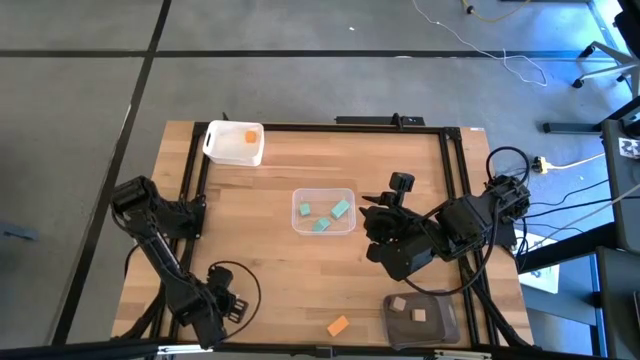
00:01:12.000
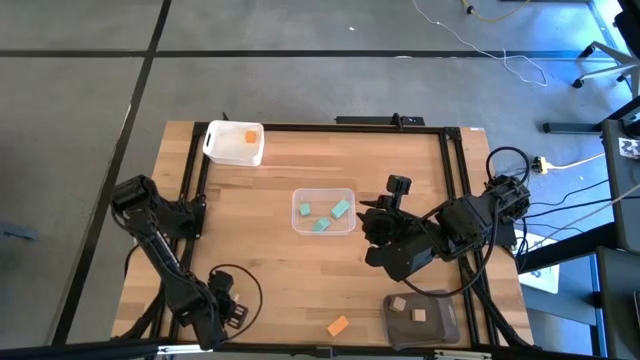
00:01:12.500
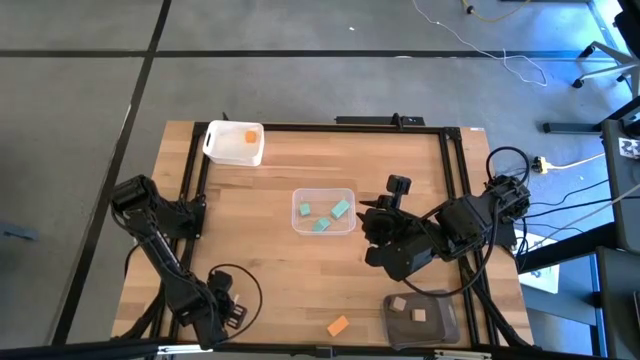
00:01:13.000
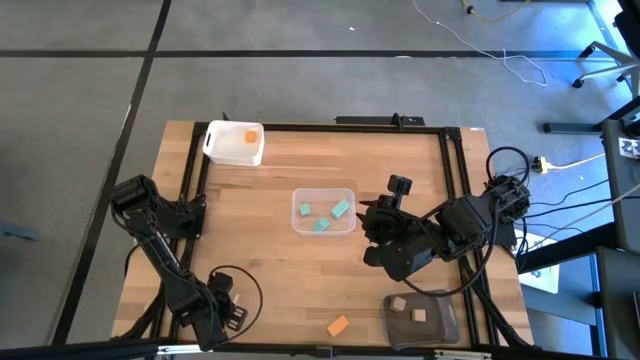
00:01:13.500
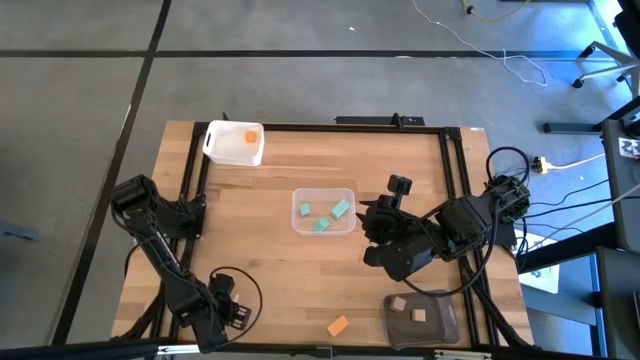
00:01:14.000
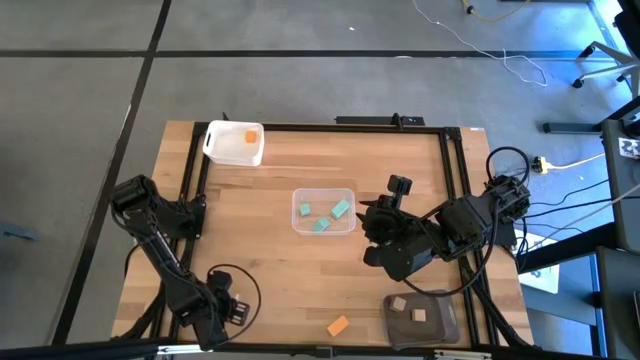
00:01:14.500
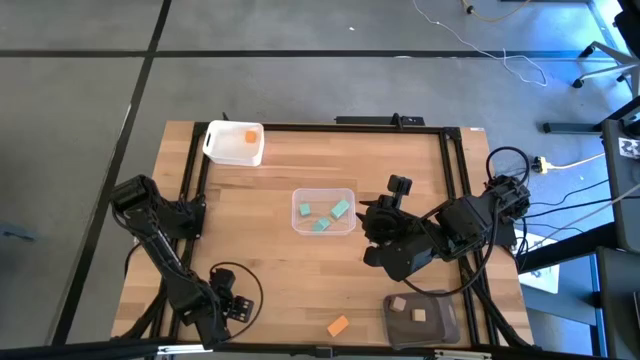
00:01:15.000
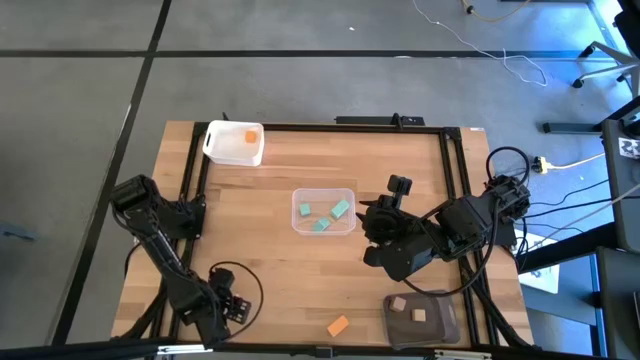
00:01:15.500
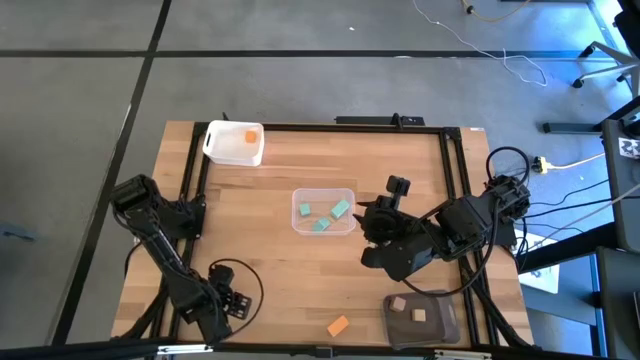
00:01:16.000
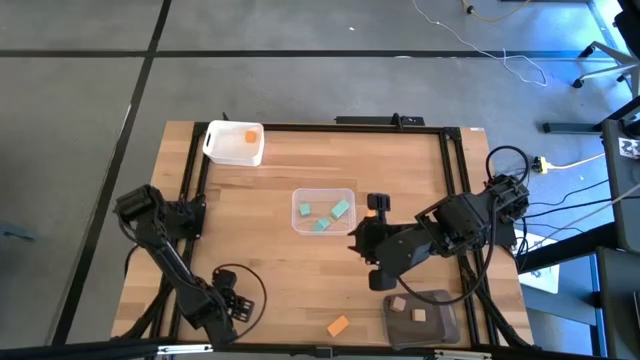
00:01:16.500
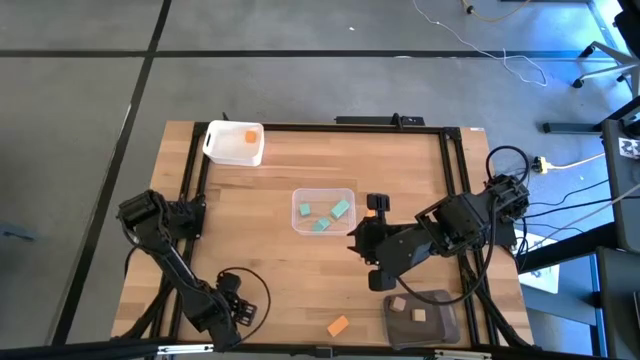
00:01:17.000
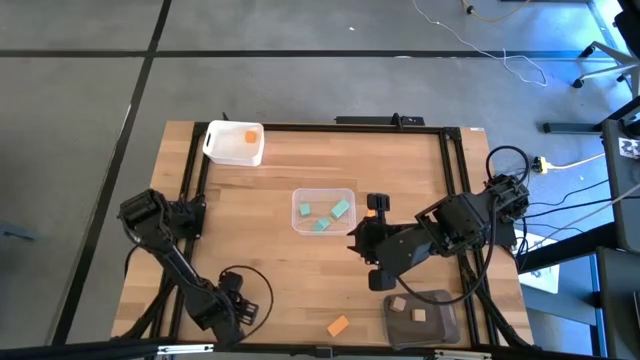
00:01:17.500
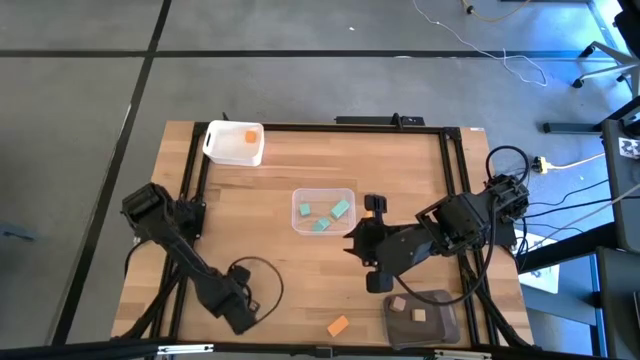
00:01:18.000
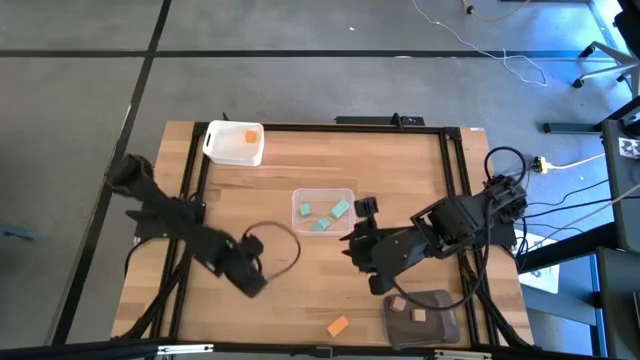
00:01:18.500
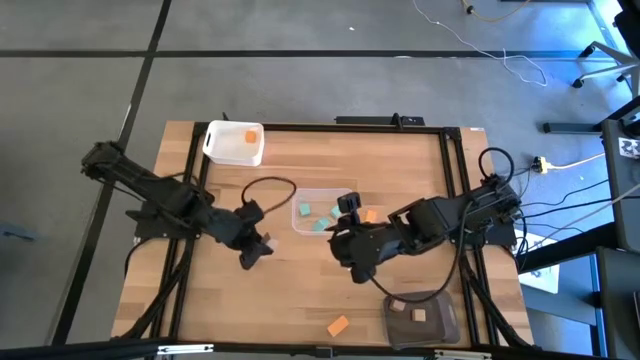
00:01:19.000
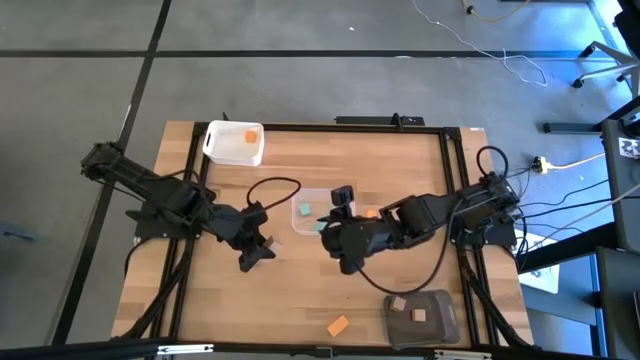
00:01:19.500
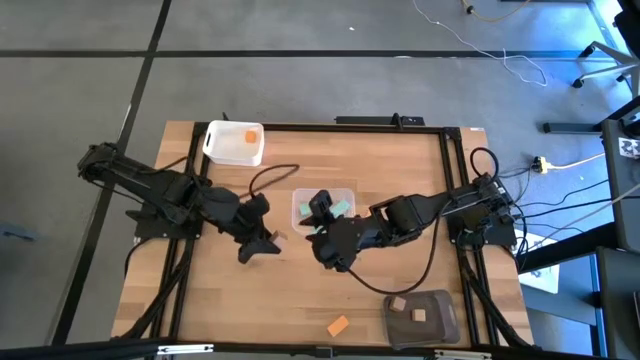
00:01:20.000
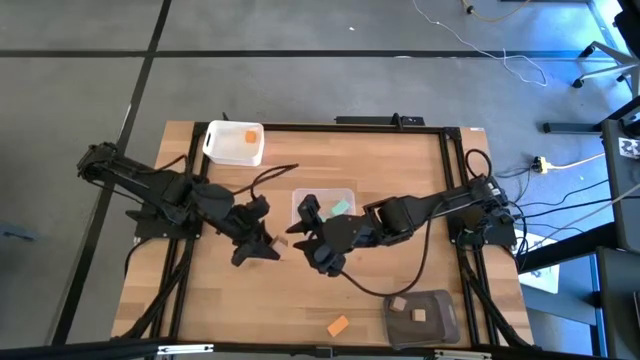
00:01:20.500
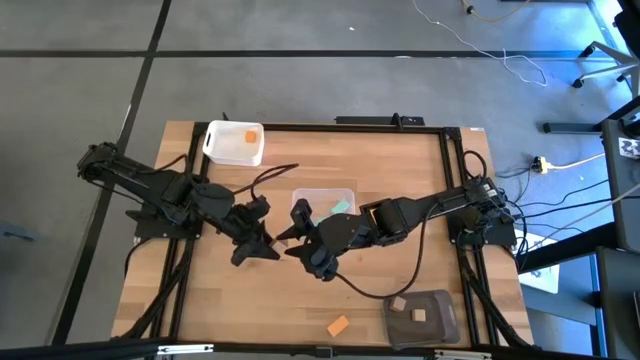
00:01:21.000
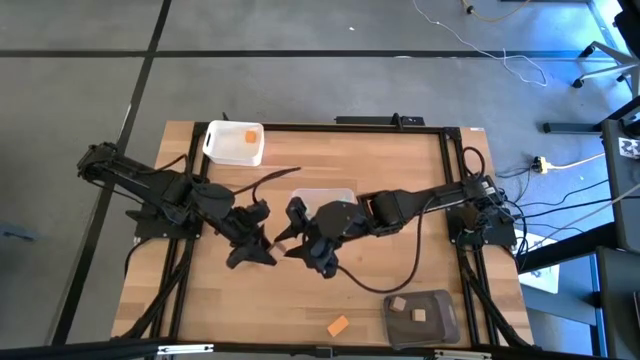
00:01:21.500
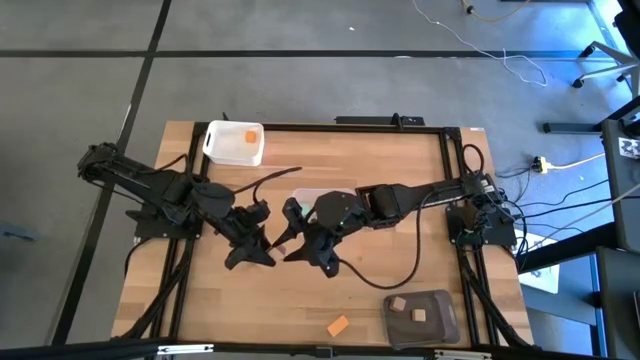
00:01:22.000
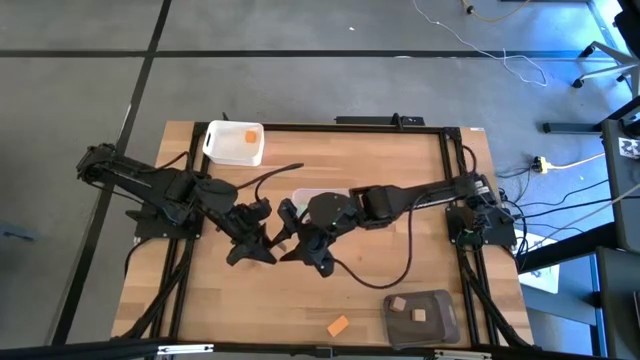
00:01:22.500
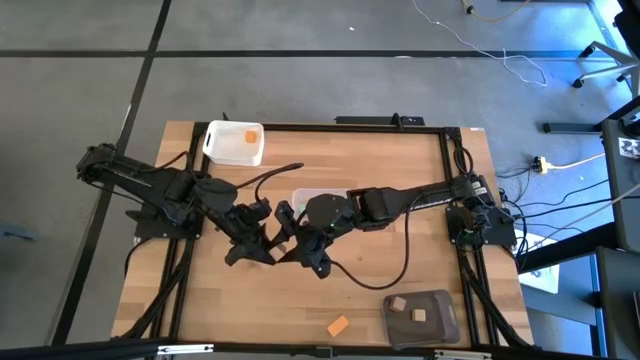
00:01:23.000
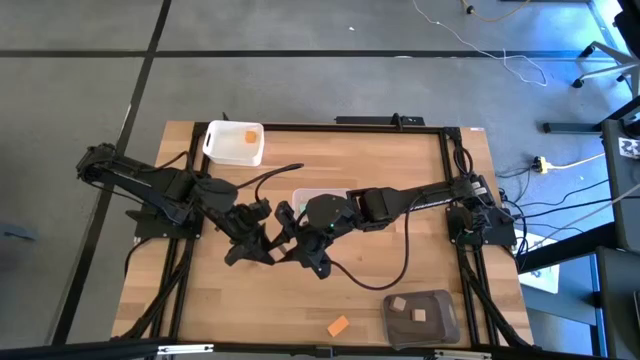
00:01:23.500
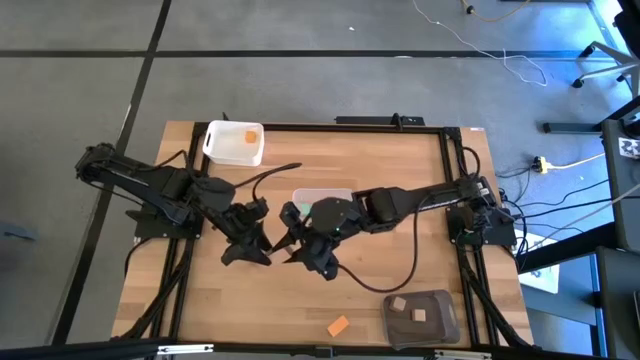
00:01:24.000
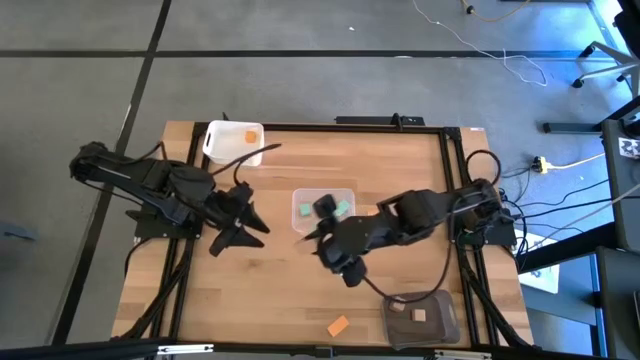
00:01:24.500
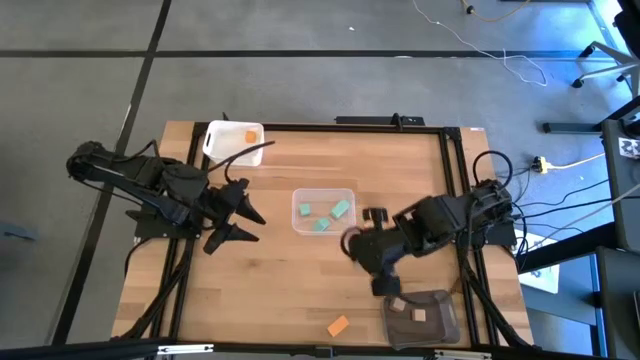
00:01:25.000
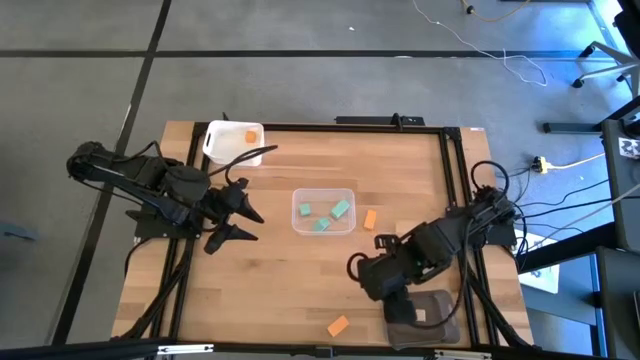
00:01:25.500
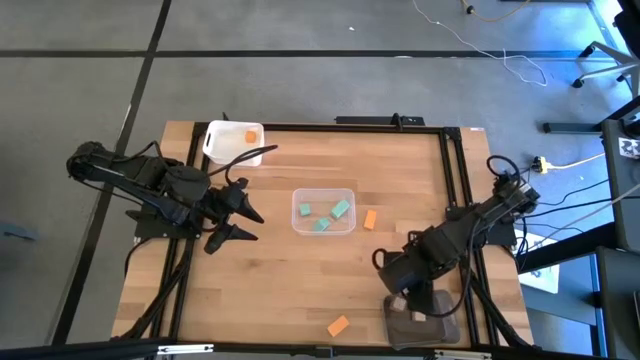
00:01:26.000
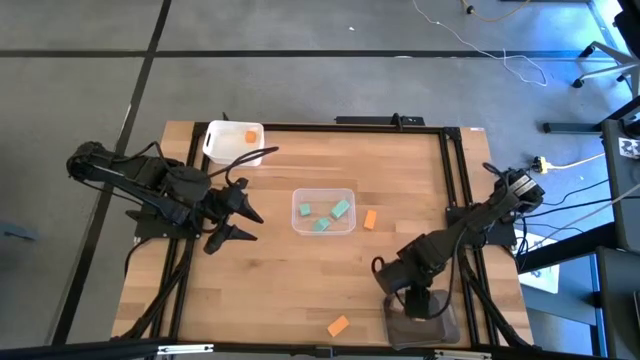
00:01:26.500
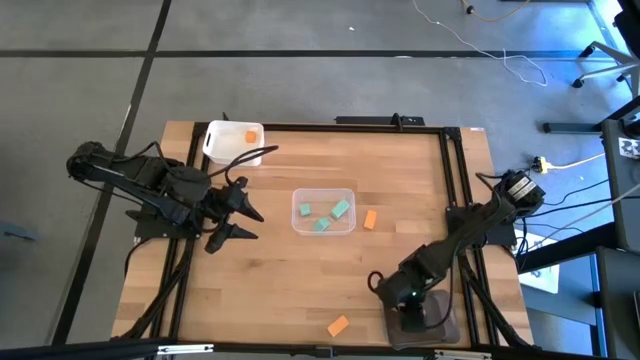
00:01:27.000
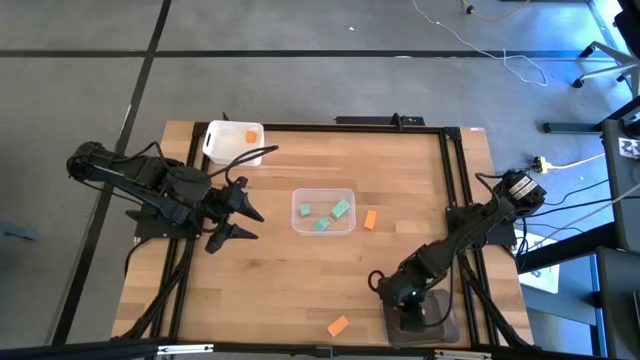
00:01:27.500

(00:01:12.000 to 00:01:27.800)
Task: Sort & place blocks by color
Put the brown block into the black bin

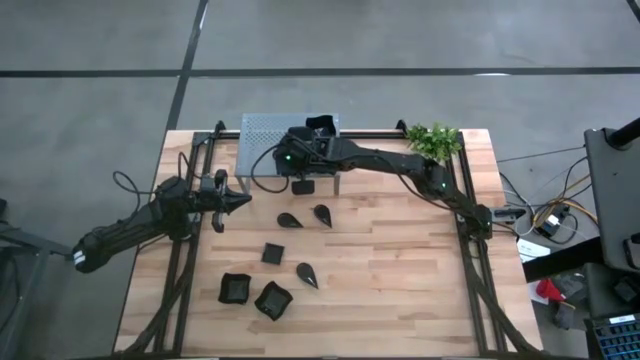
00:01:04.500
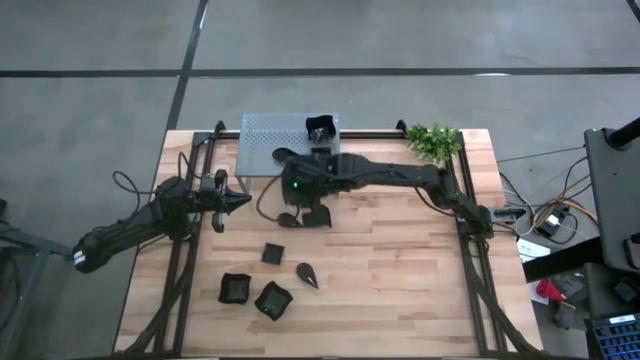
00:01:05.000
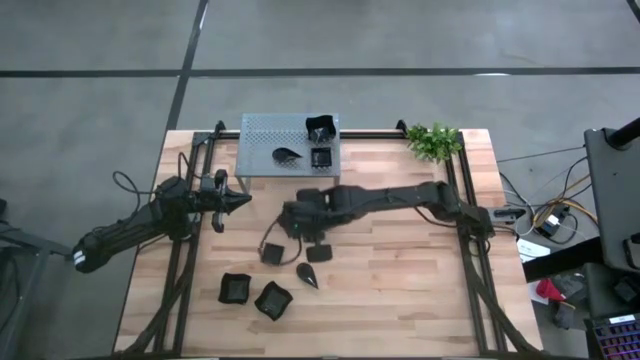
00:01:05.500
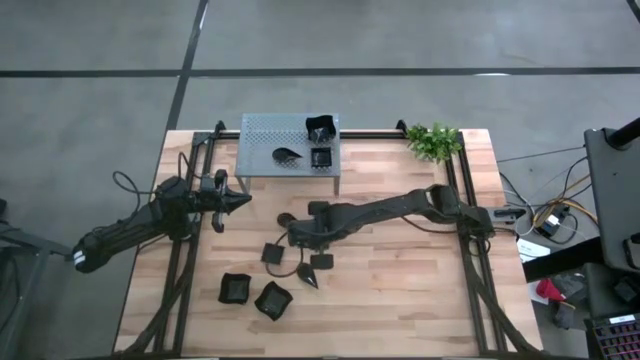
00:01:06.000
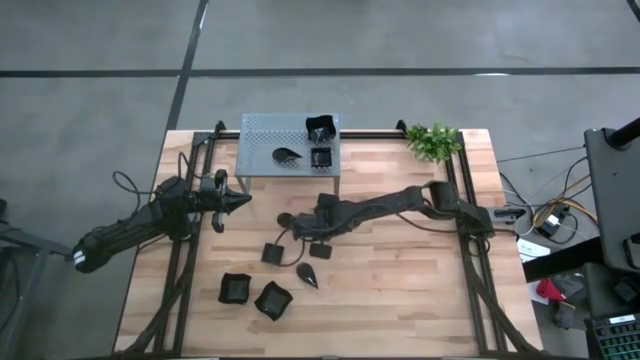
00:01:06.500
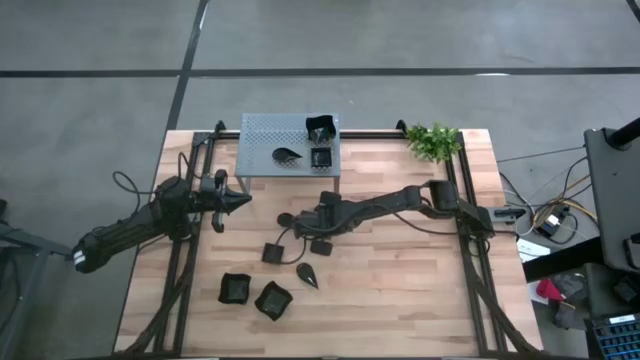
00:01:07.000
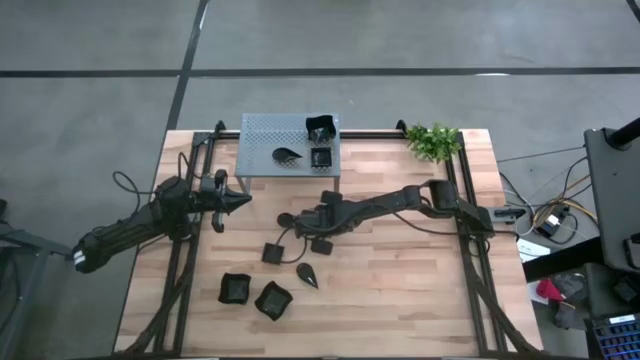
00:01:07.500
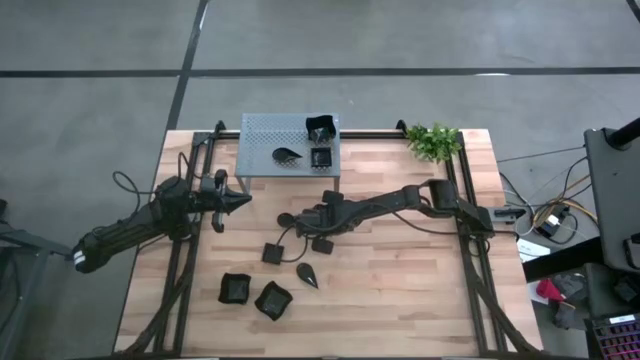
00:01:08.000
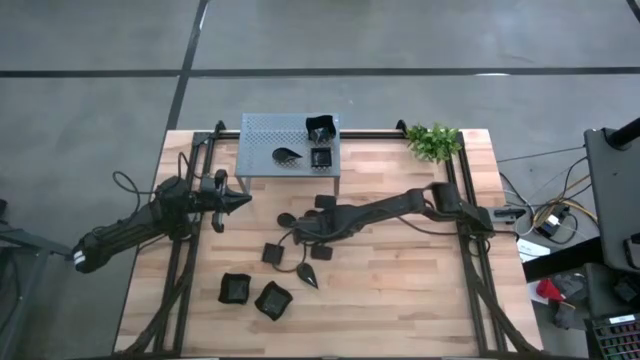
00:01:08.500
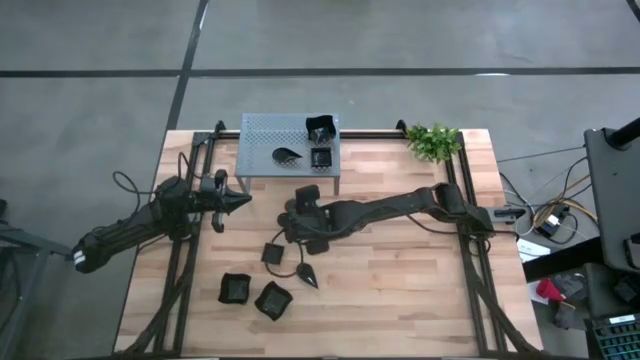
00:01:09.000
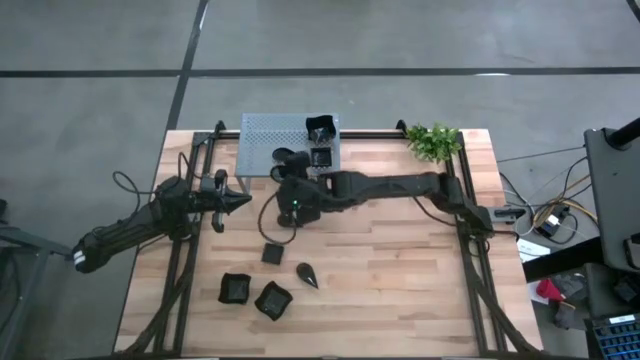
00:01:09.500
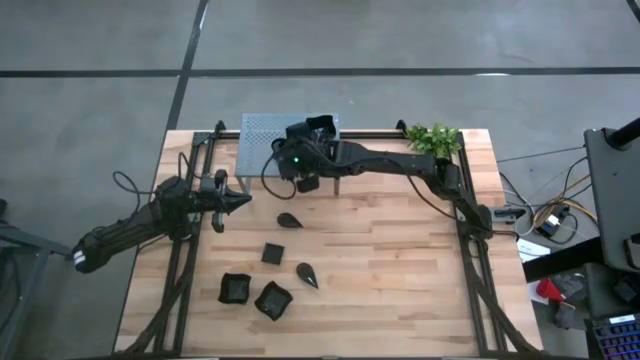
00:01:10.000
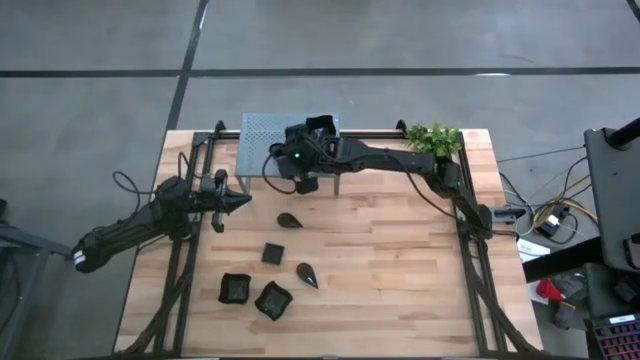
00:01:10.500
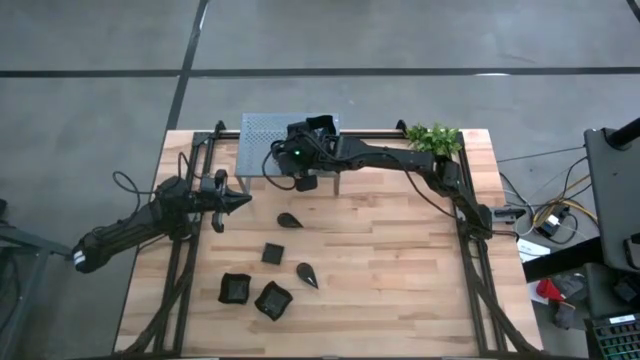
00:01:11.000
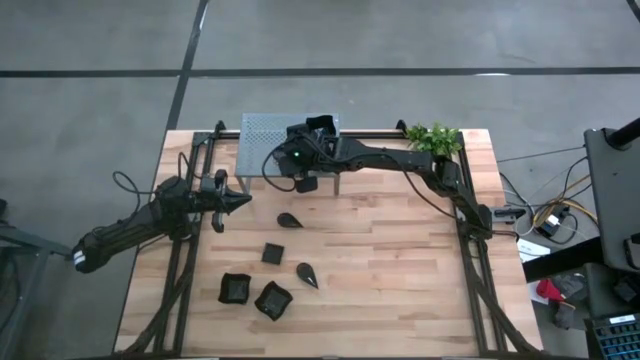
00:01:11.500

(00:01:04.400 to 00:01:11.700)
Task: Pick & Place Mini shaped plates
Stack the black drop shaped plate on top of the black drop shaped plate on the shelf
